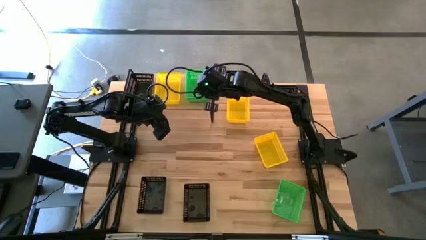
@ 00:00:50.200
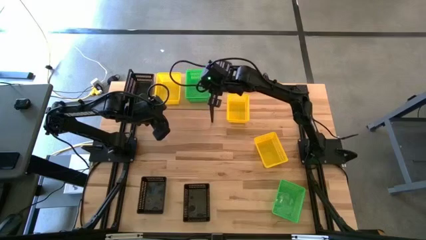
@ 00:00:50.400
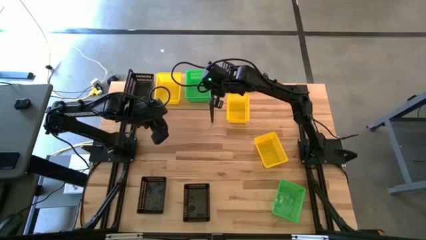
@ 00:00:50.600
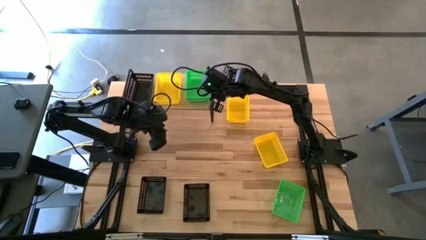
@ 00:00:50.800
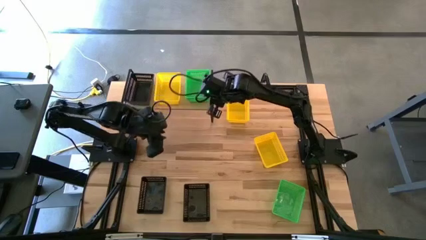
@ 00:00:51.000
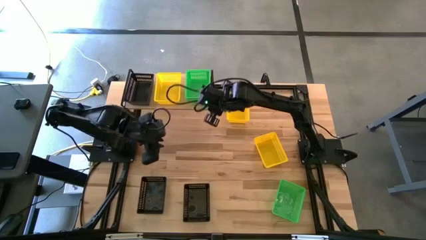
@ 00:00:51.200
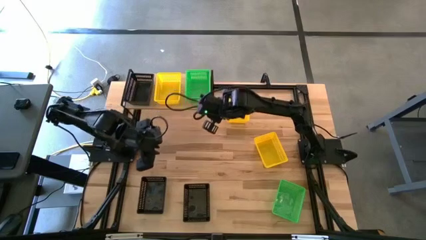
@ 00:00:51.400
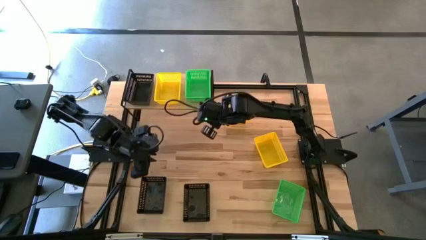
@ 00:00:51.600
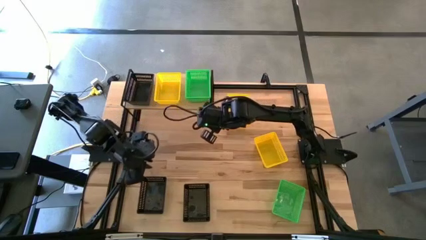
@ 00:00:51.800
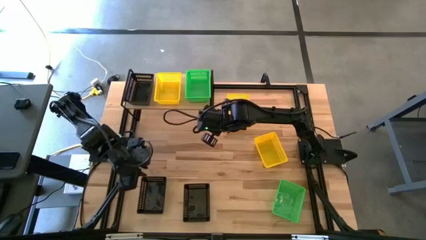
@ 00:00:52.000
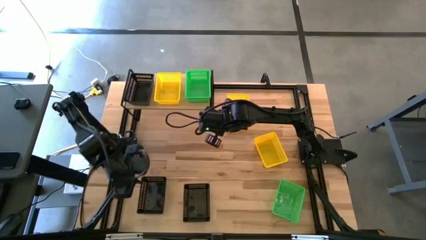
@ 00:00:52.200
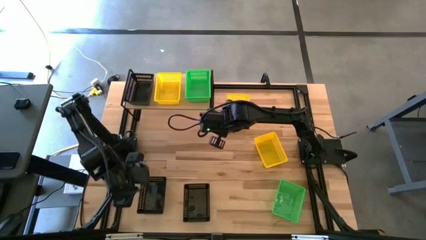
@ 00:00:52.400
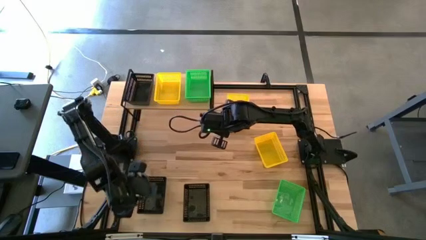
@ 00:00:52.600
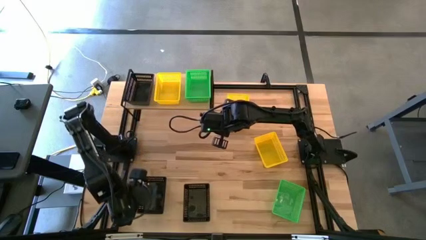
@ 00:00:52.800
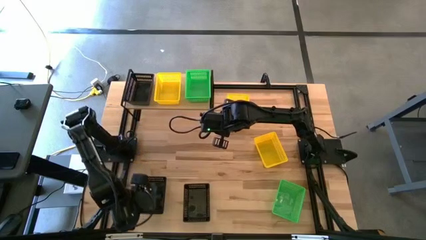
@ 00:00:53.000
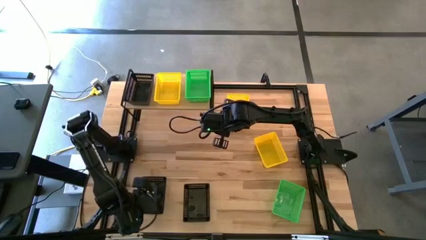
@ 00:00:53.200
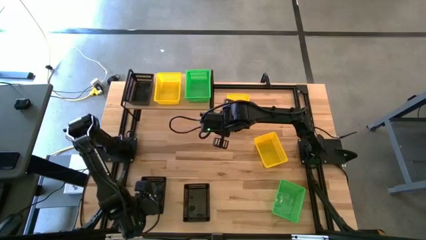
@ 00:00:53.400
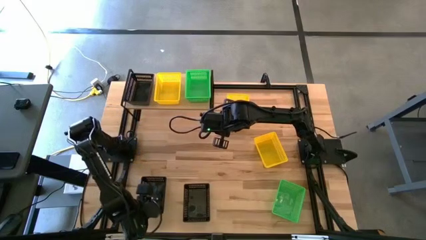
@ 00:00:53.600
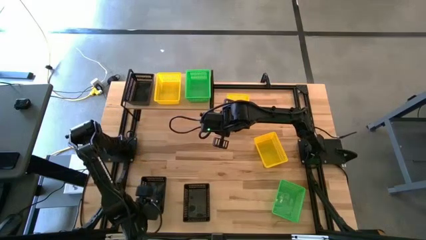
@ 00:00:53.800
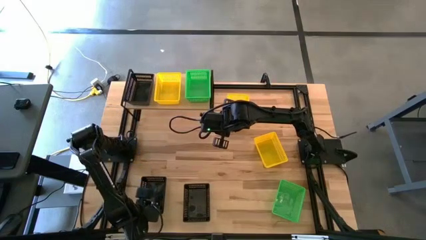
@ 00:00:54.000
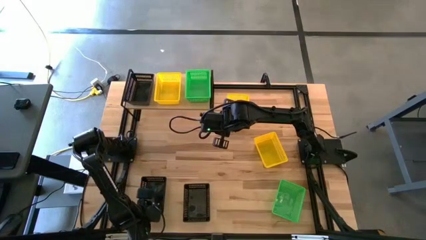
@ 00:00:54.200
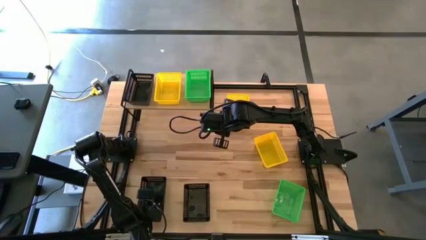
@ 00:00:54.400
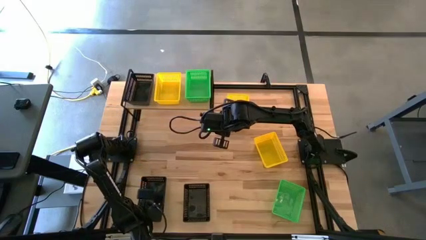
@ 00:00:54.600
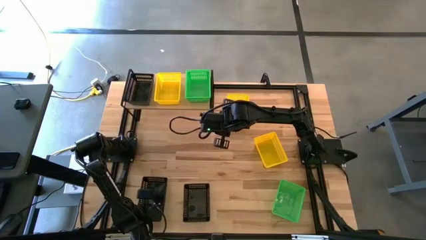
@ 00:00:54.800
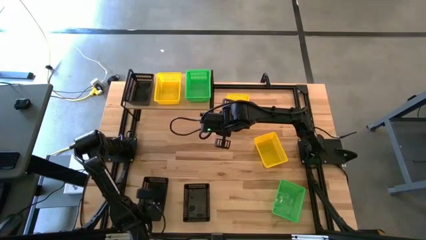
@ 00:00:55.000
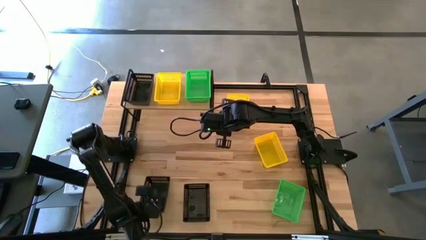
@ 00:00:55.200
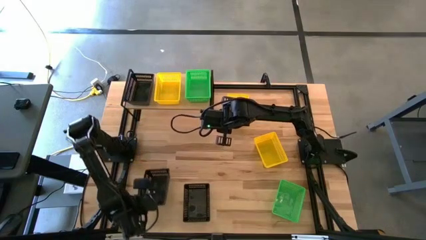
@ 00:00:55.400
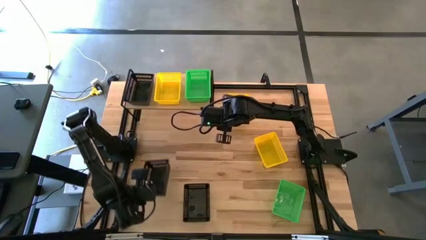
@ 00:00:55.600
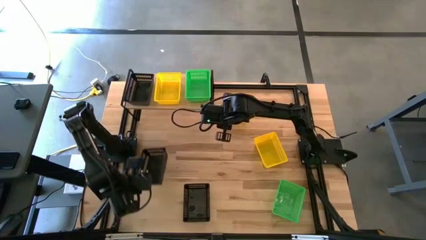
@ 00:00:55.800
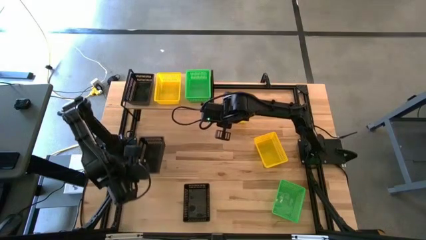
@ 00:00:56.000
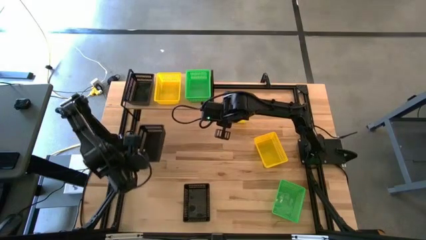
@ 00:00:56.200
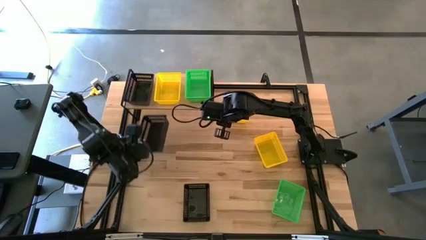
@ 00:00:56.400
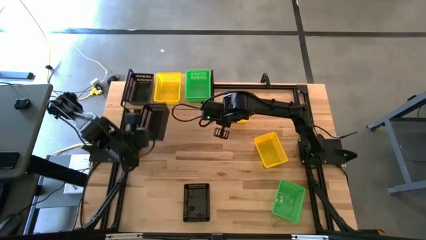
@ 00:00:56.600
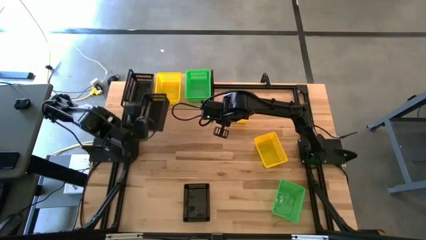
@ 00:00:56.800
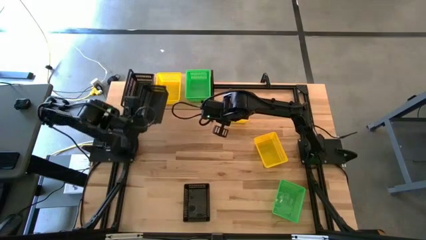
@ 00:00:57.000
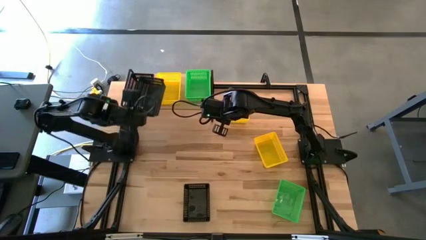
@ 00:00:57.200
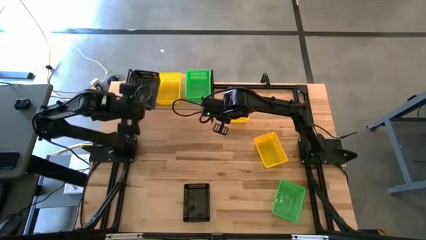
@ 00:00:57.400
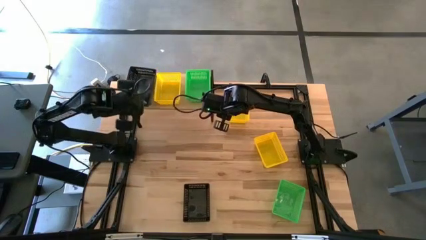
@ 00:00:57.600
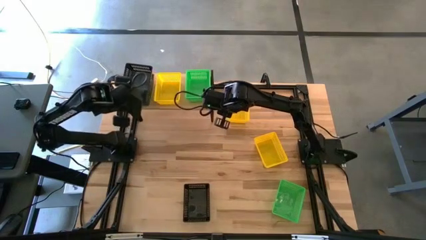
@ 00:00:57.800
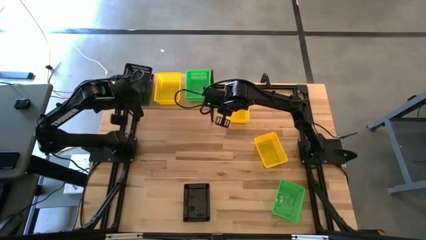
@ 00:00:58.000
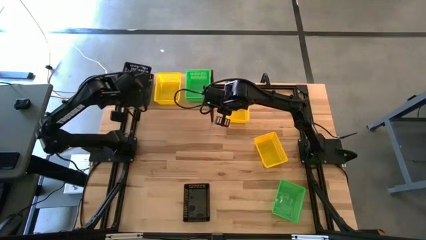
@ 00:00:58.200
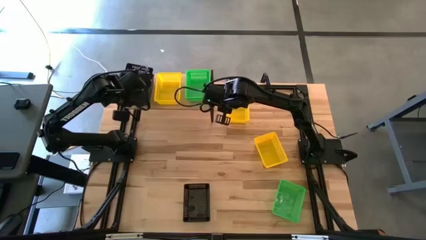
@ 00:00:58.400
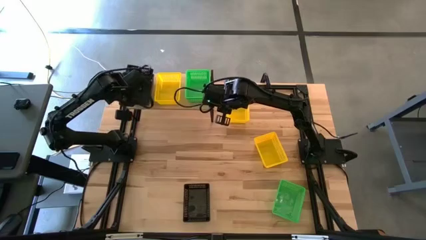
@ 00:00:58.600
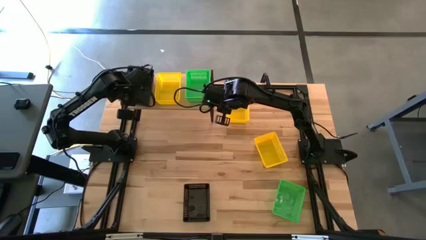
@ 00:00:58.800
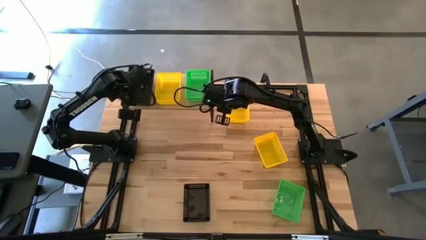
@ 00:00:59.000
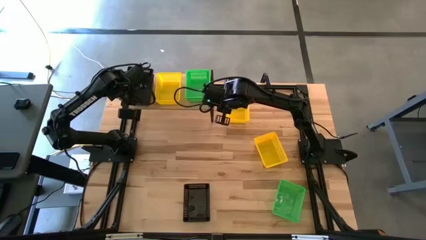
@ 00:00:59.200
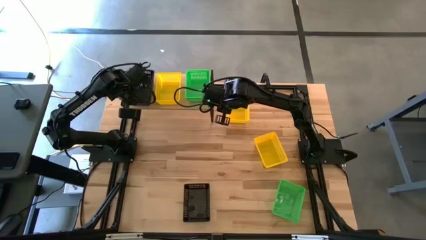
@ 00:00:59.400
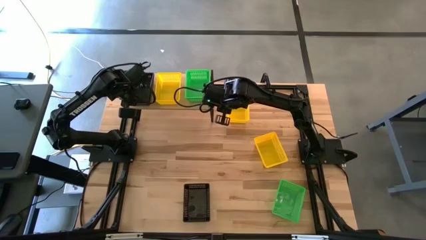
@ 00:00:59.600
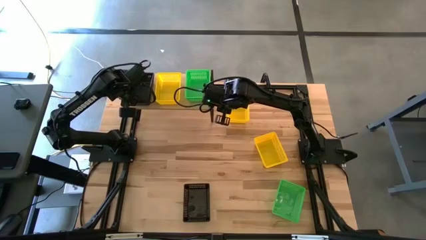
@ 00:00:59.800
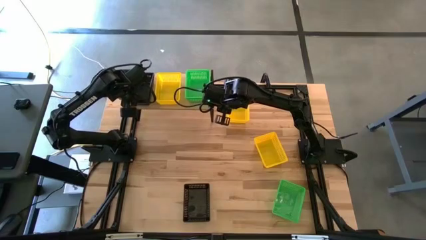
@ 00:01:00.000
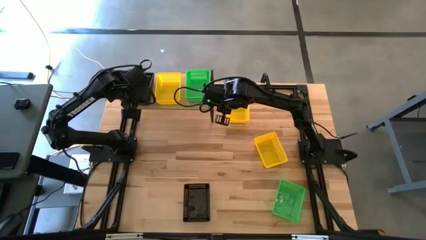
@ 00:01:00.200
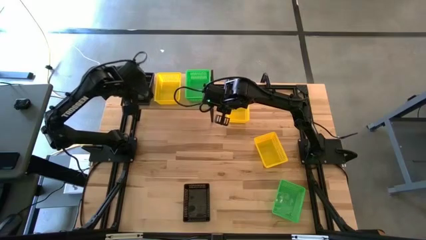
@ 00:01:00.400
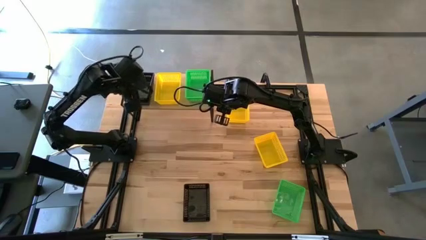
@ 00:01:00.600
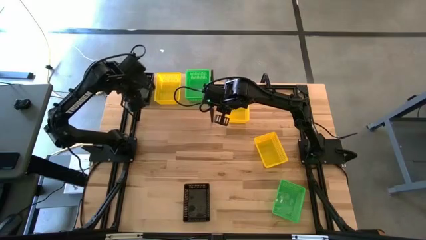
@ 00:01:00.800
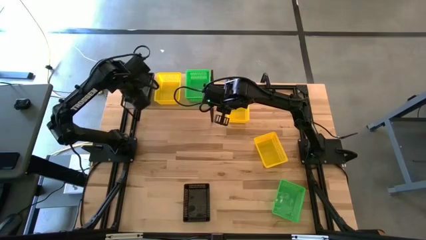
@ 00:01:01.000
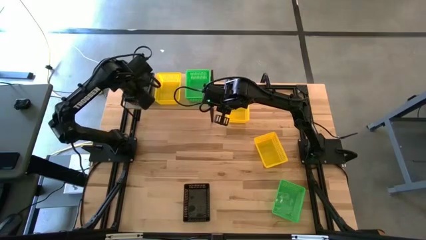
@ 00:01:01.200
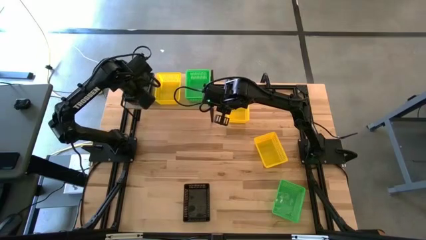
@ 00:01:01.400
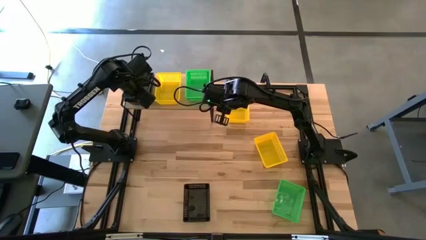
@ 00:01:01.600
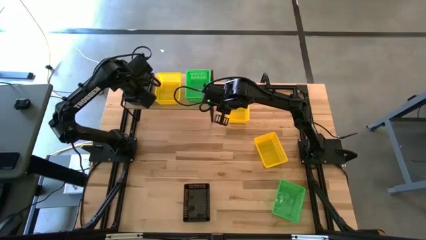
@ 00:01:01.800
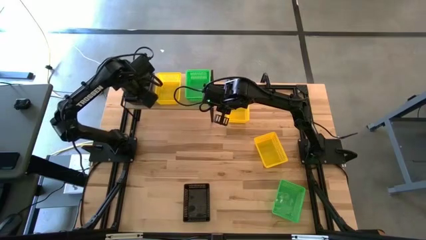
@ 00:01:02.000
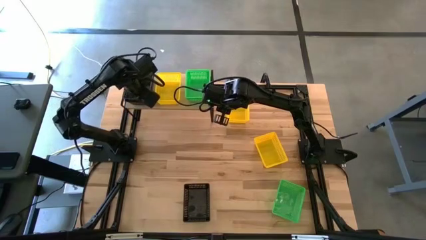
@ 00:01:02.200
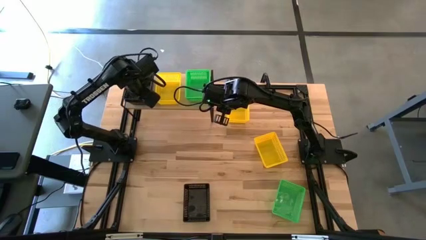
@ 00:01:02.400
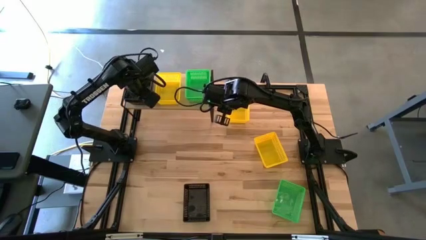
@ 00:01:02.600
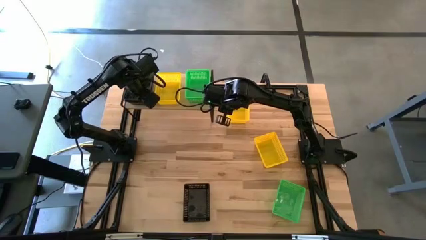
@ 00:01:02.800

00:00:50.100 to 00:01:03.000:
Task: Stack baskets on shelf by color
Stack the left black bin on top of the black bin
